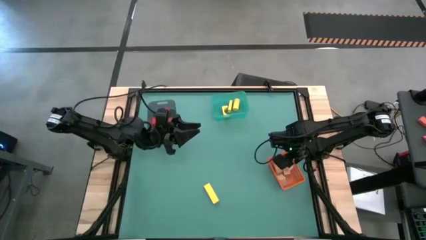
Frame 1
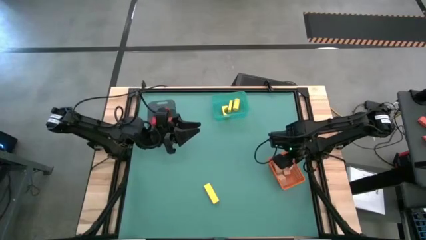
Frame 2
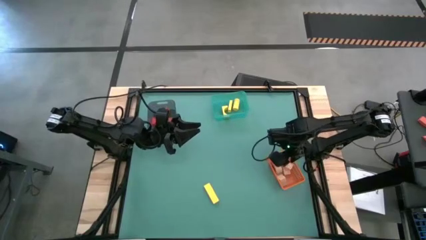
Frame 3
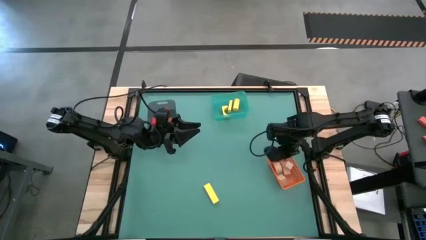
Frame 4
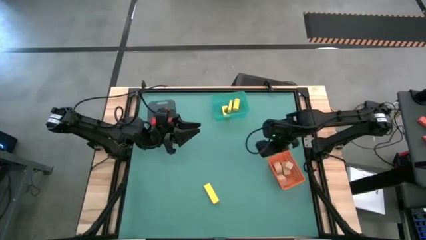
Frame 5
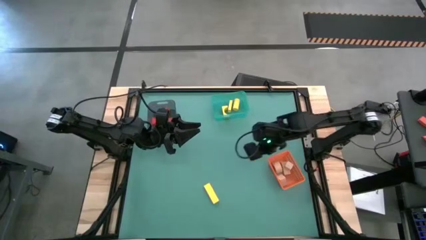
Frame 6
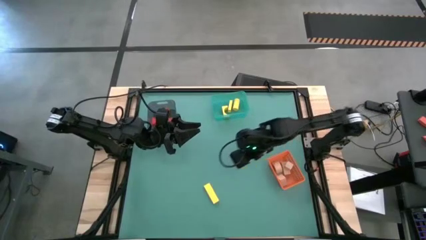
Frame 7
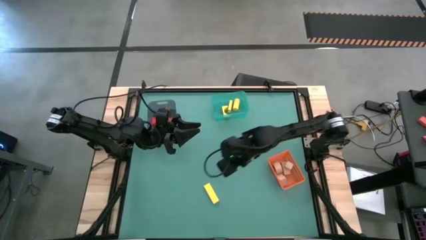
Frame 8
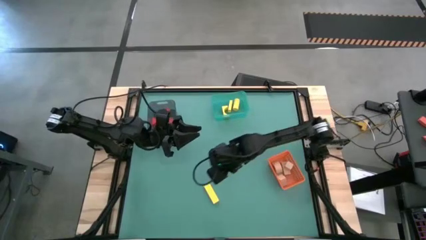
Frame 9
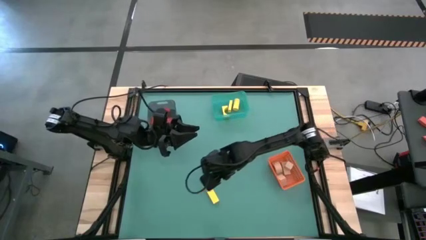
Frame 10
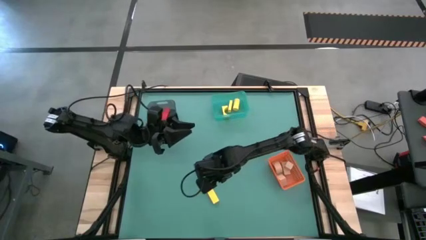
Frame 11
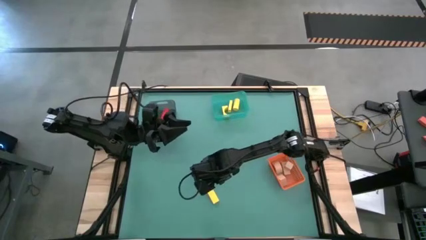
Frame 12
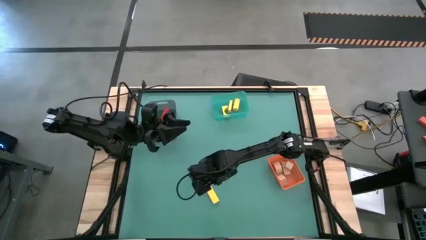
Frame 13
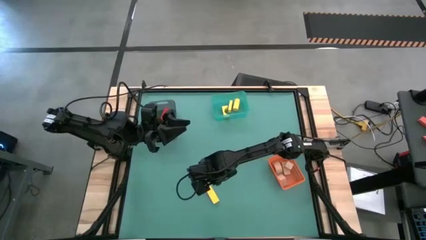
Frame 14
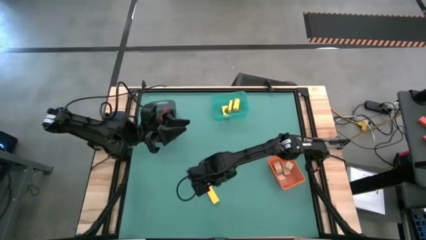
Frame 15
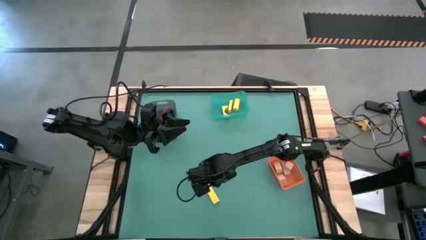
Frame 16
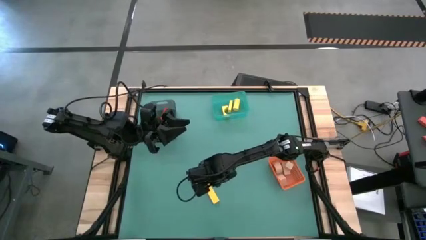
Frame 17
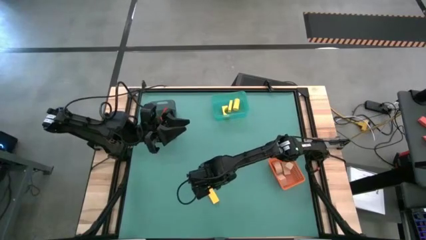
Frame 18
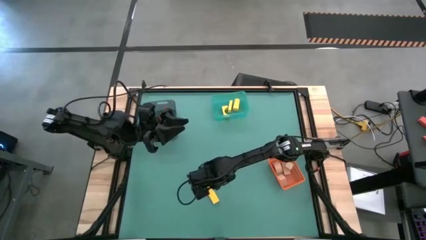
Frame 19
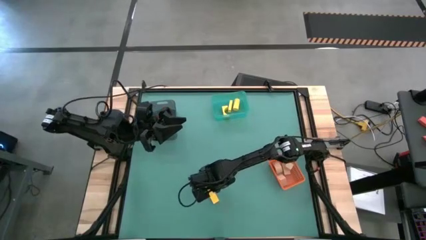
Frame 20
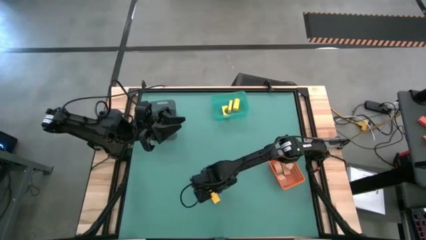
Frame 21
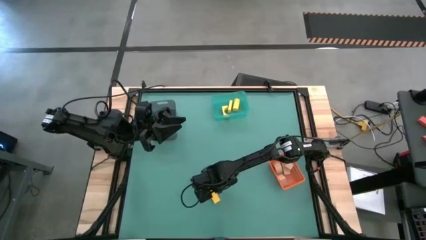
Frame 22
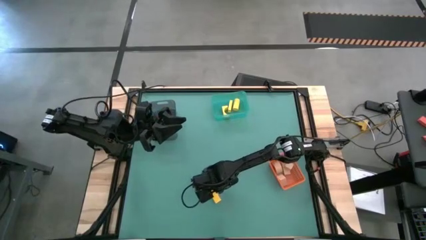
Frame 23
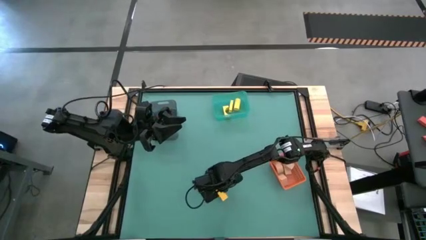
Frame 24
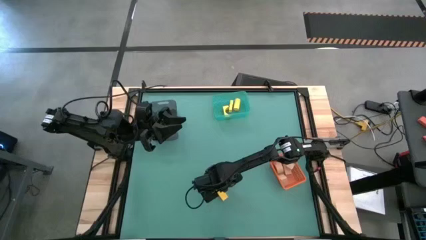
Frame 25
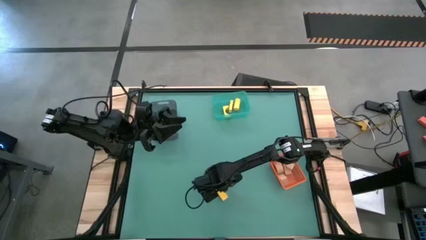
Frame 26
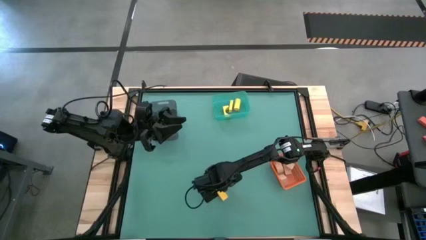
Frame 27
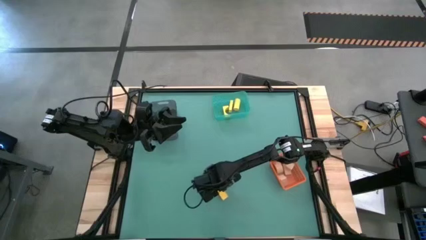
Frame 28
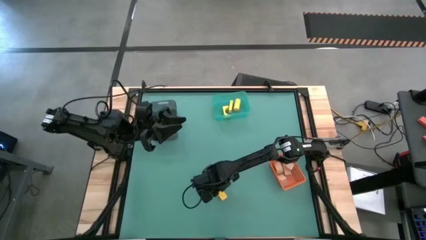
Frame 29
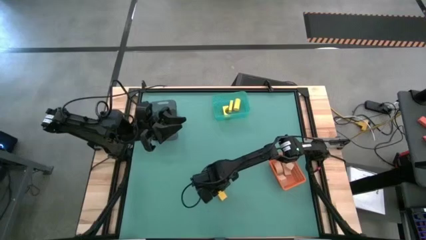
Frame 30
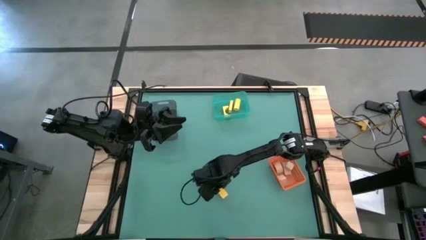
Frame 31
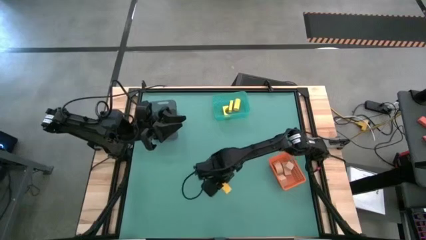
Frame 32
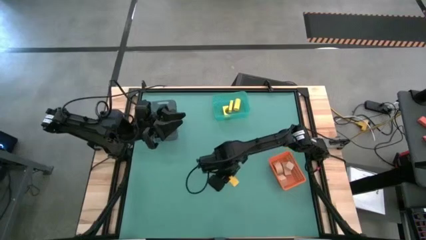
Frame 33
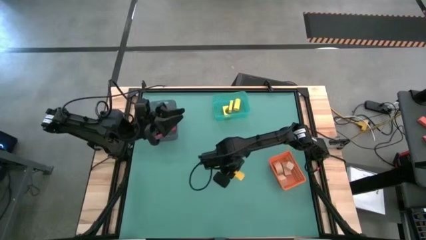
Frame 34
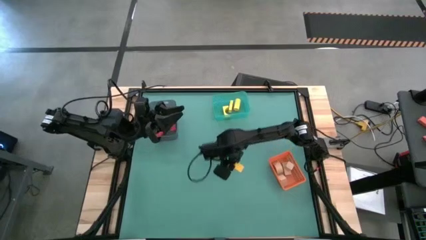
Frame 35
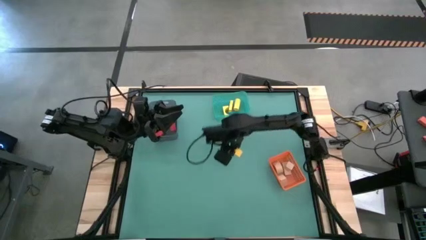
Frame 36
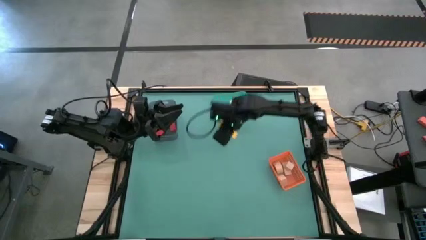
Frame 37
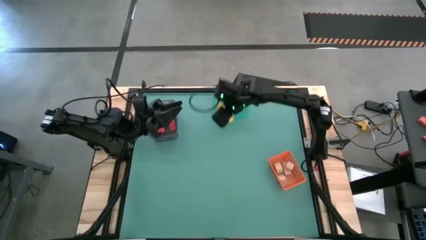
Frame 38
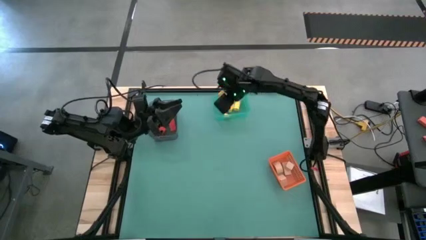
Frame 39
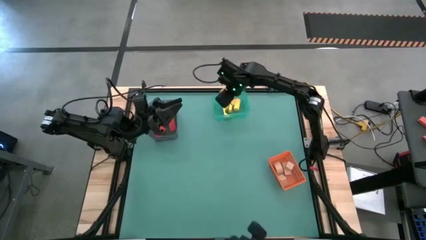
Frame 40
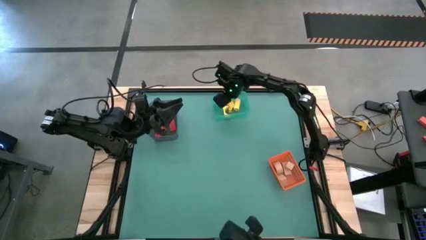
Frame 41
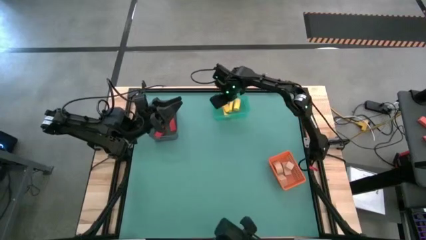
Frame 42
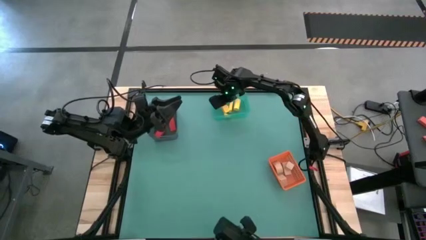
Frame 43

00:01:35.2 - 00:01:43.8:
Task: Sort & place blocks by color
Put the yellow block into the green bin

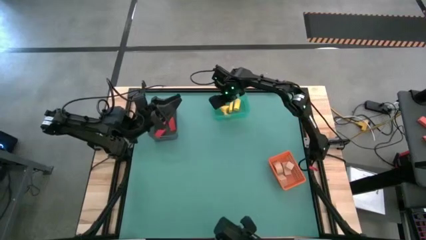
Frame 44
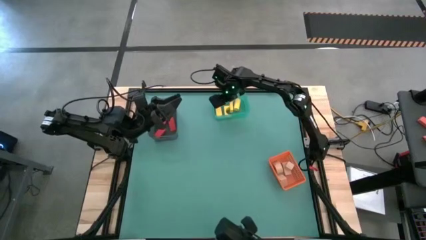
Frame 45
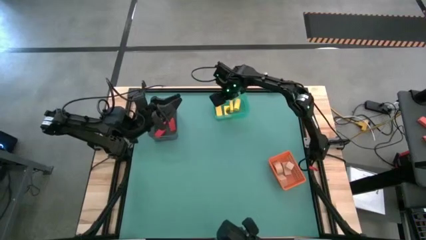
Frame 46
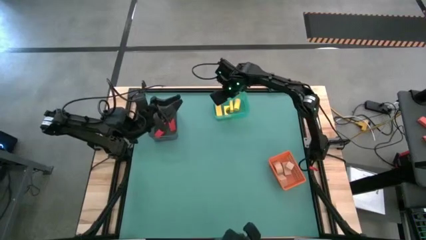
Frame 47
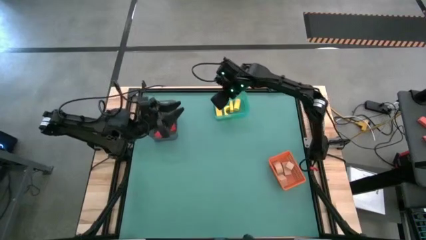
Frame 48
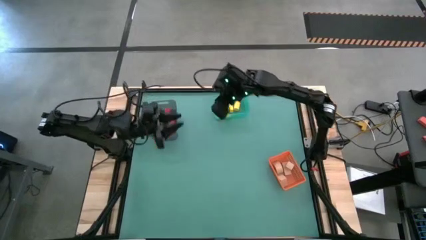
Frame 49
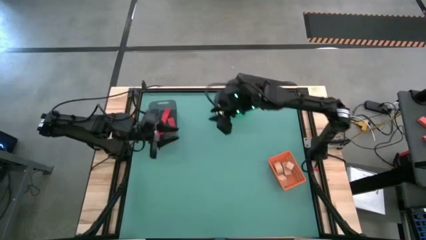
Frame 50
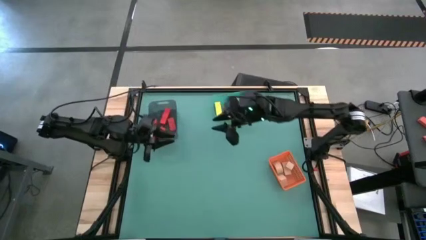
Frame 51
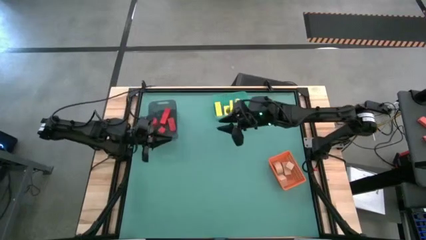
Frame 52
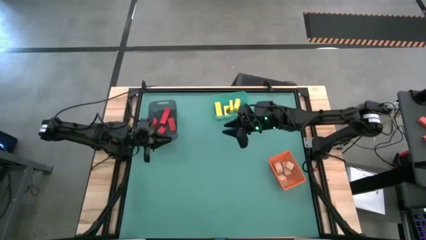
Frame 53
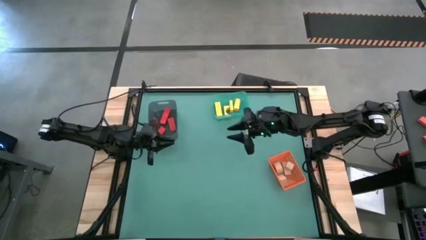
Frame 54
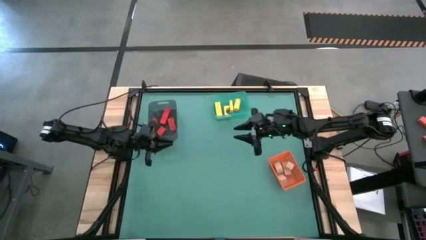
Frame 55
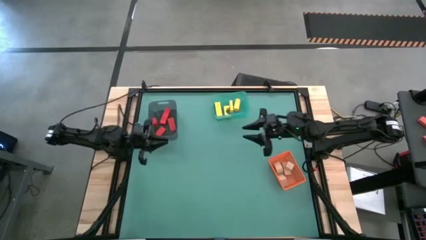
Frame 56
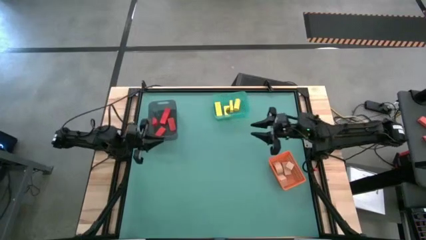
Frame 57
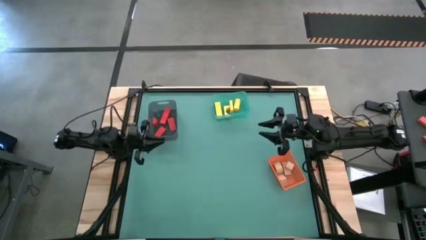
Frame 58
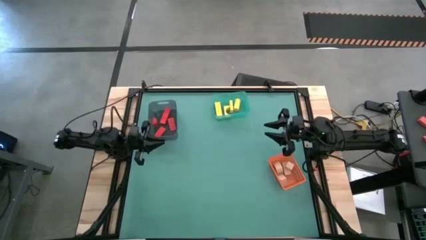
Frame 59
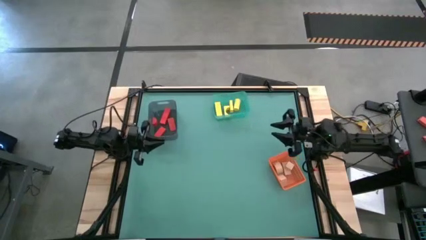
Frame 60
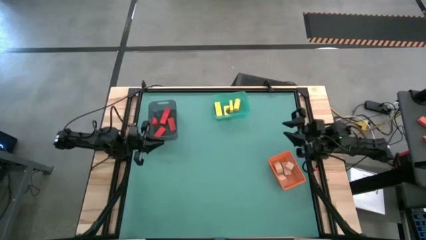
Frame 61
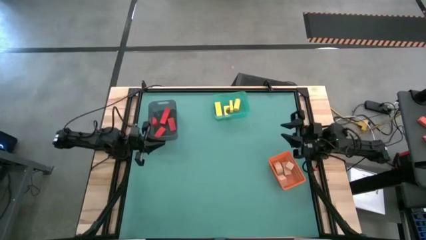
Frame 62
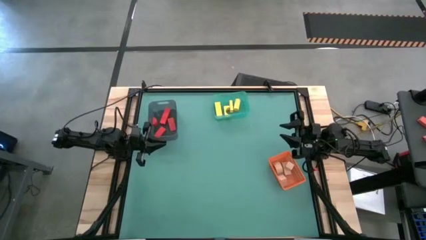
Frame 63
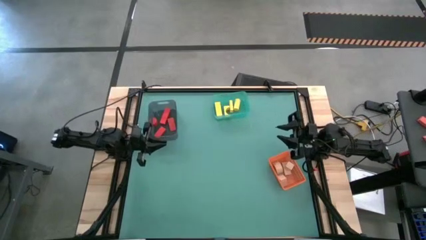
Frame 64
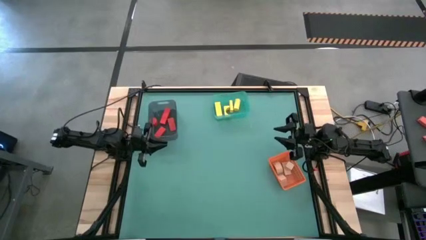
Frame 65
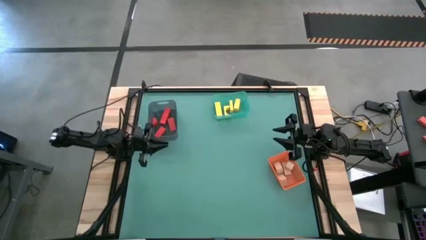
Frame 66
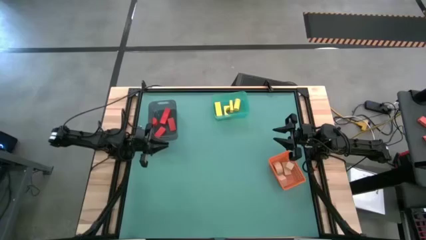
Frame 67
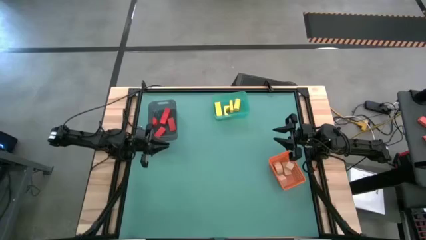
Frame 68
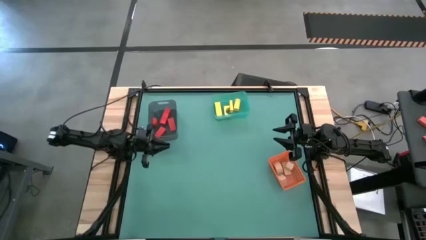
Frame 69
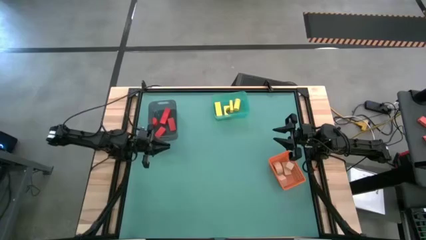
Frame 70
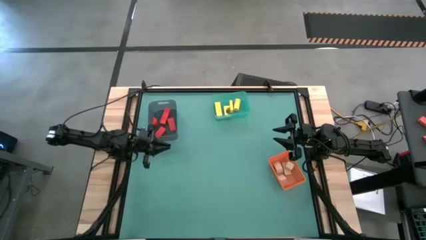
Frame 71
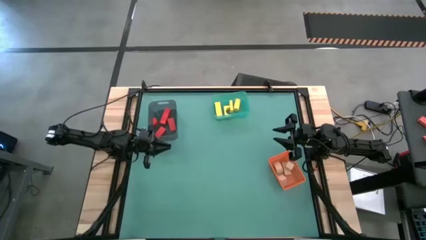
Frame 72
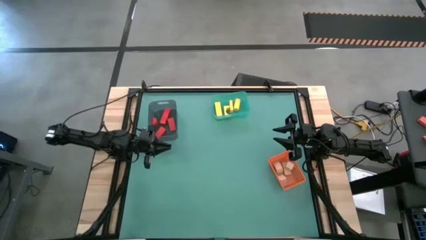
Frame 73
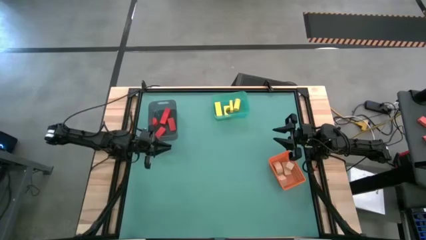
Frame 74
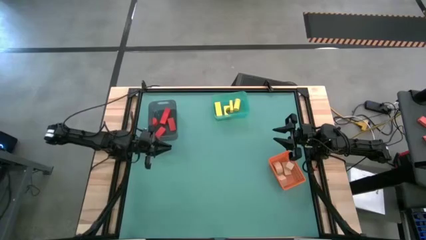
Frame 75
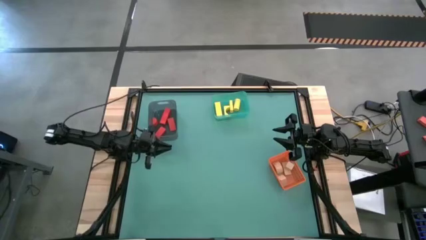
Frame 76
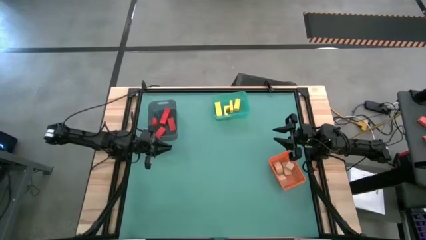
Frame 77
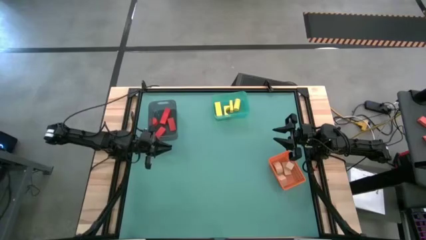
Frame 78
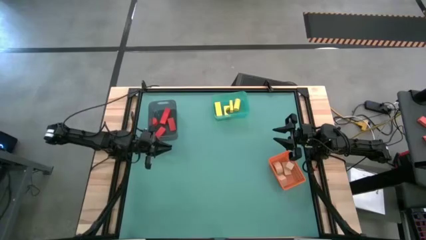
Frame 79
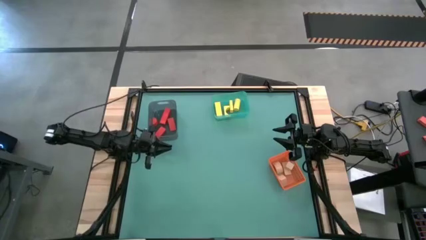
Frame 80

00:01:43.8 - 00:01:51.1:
Return to Home Position
